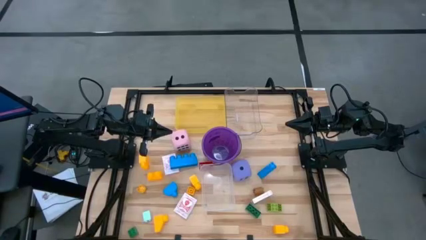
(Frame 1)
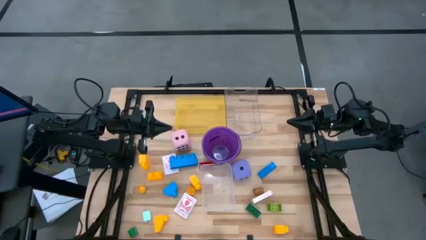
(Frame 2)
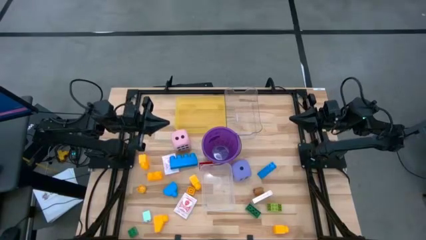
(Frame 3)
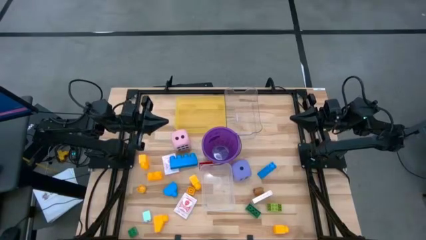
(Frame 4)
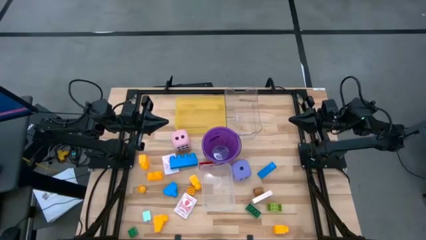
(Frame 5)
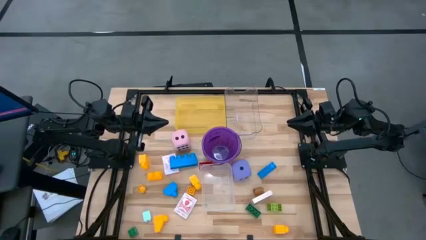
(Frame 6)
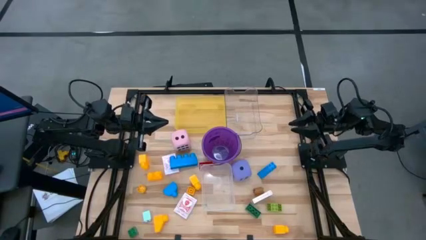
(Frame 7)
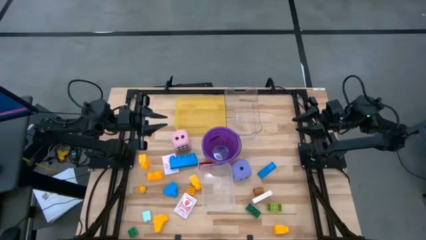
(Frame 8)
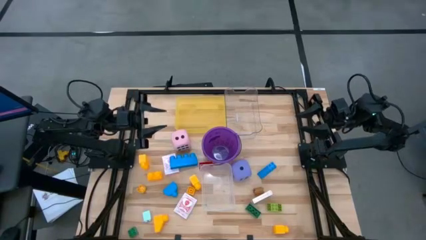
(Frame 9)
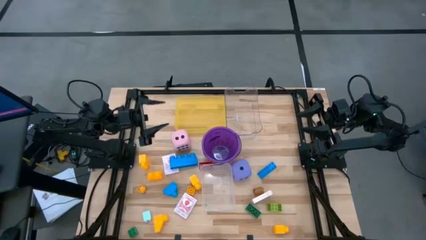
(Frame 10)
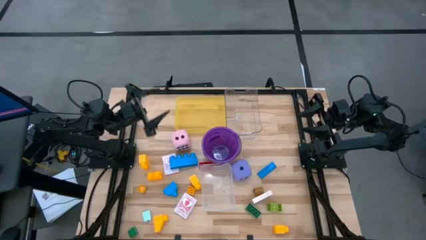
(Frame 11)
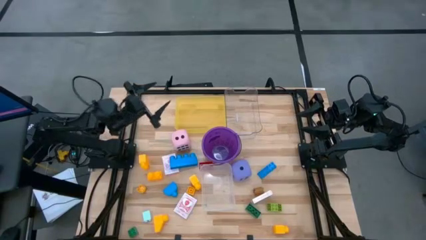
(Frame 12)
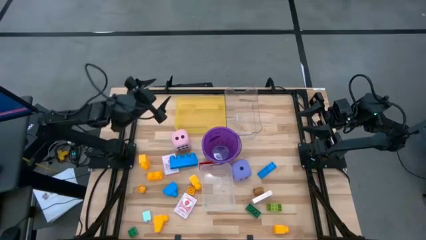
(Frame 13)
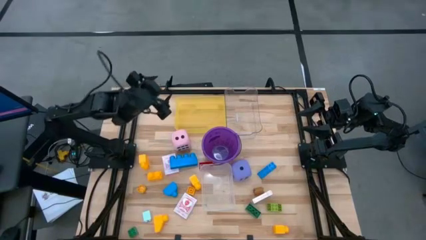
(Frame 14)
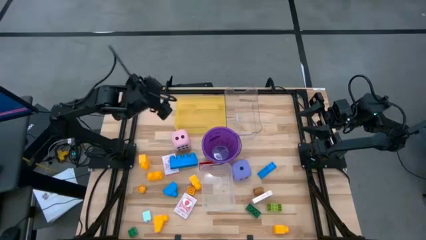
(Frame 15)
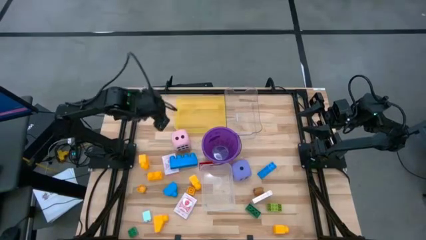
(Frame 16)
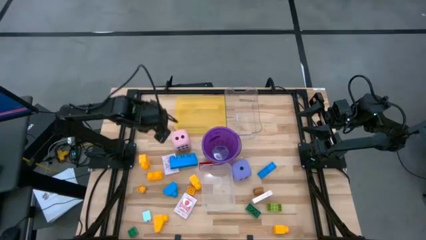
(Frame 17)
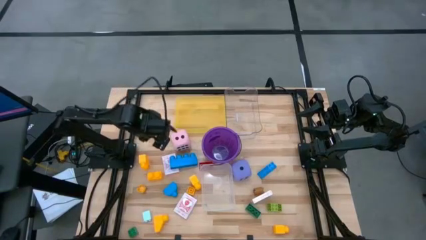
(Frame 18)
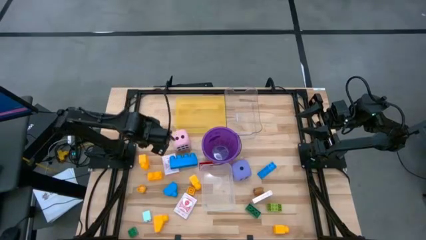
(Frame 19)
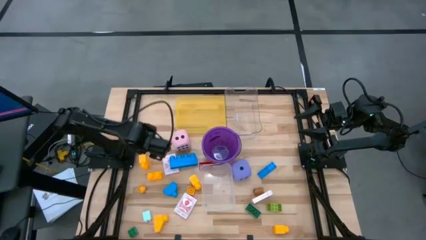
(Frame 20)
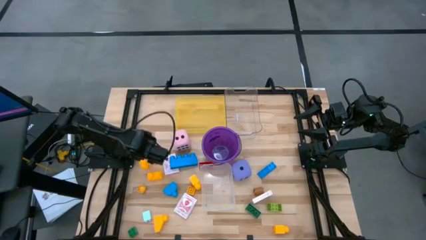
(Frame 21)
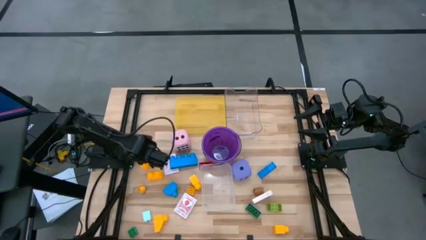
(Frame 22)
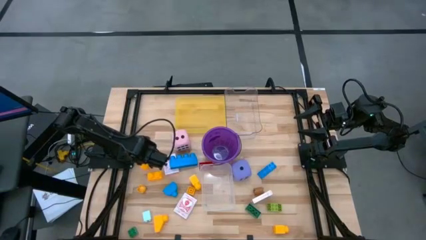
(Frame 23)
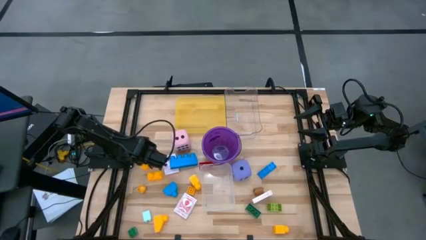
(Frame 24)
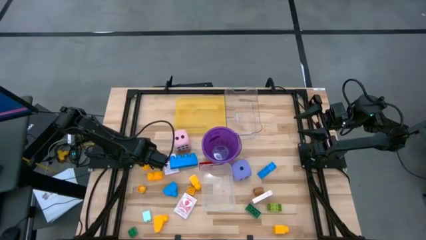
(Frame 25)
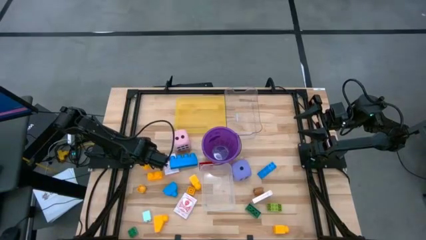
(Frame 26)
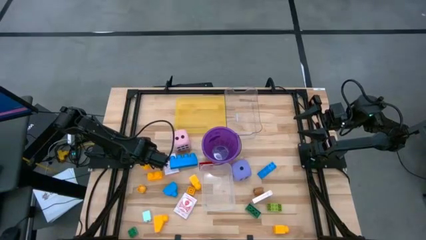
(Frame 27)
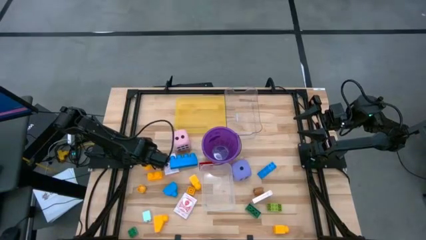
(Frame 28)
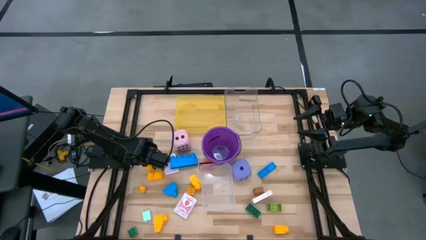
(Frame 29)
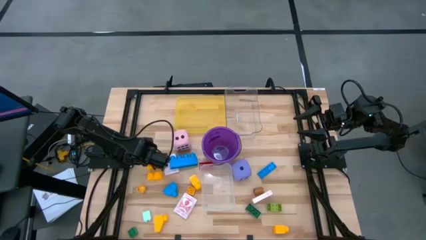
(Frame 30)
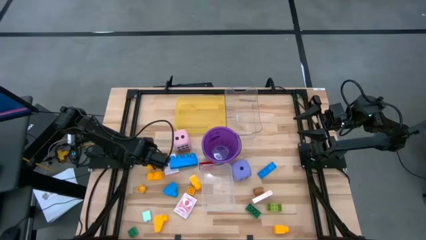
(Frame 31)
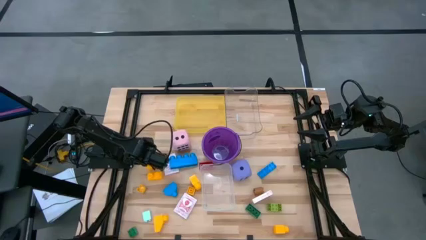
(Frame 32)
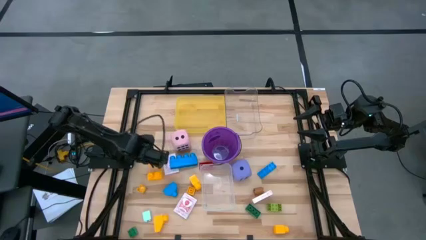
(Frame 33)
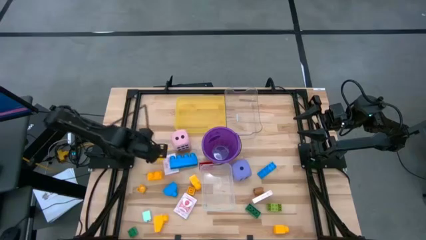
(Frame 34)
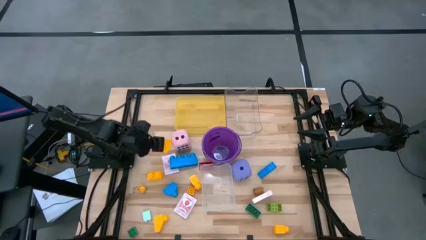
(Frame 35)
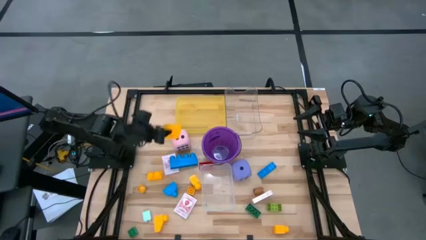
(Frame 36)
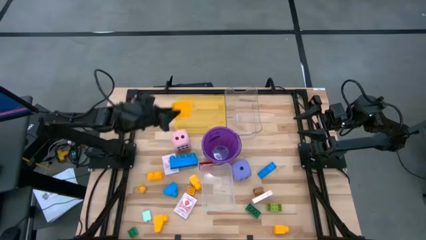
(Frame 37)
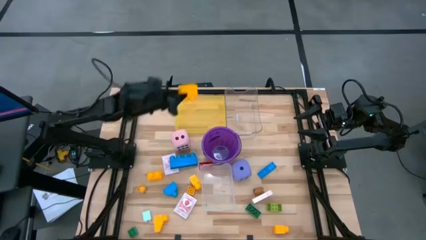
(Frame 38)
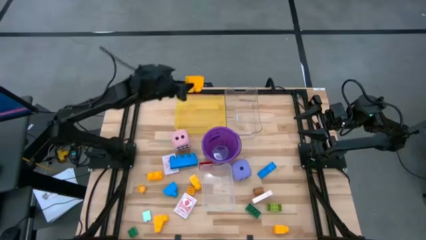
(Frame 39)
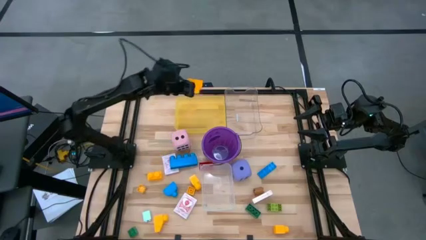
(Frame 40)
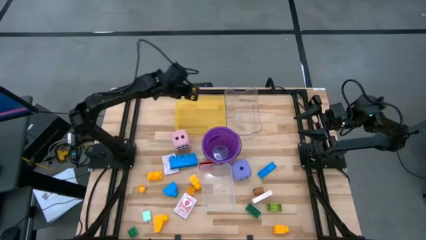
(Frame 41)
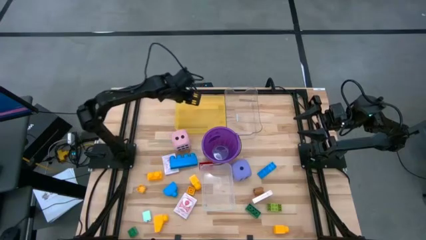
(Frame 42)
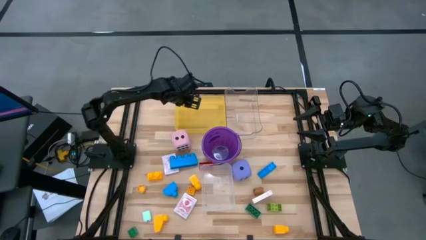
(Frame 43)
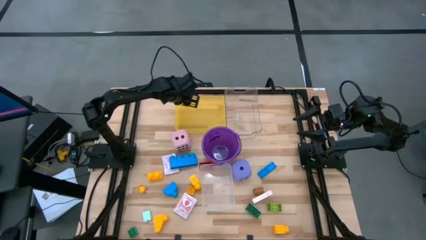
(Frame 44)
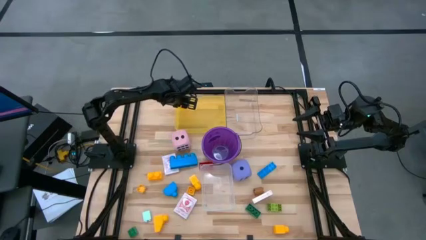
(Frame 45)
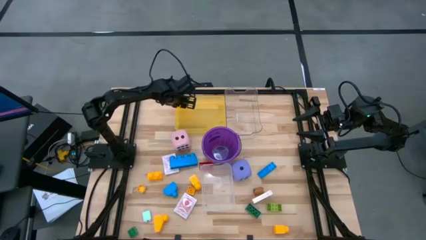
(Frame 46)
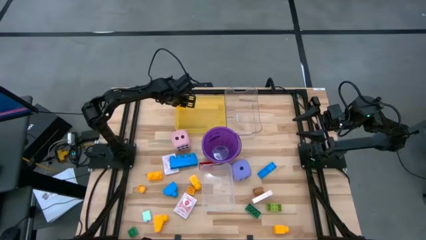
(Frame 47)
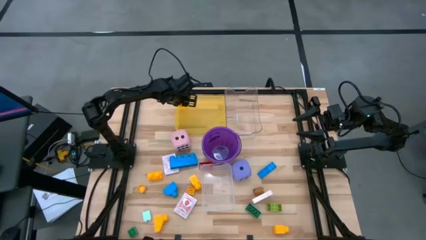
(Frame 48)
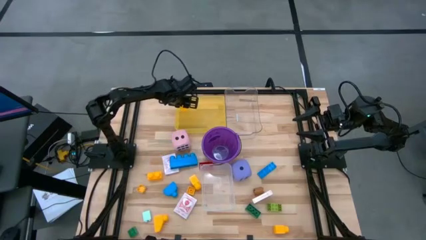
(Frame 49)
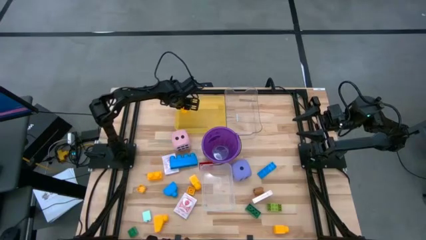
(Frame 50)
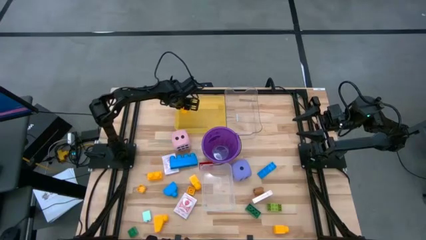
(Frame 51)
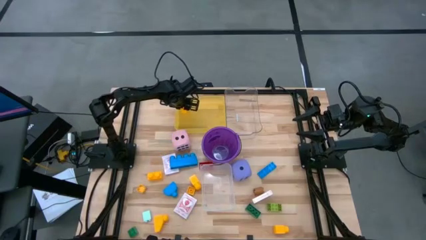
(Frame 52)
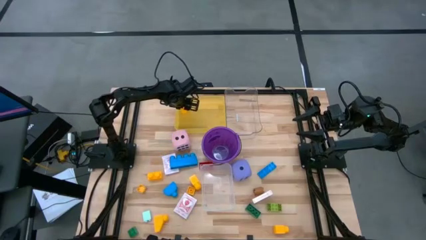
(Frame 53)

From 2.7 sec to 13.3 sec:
Task: Pick & Place Toys
Put the yellow game piece into the yellow bin

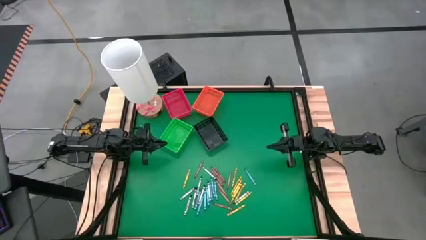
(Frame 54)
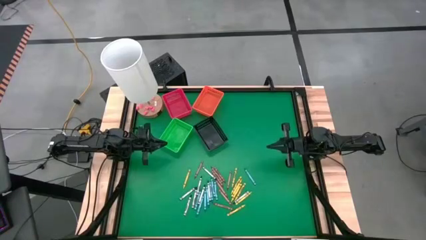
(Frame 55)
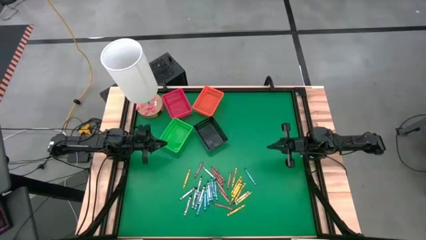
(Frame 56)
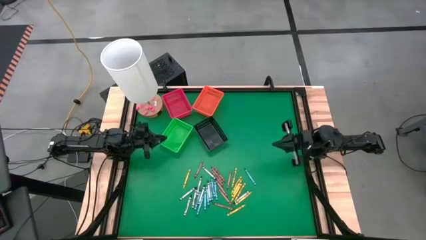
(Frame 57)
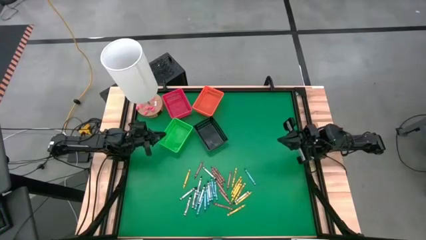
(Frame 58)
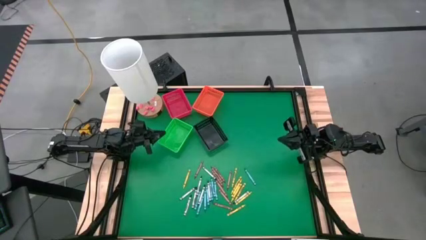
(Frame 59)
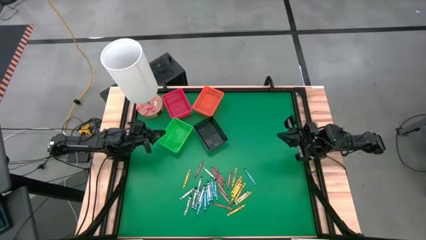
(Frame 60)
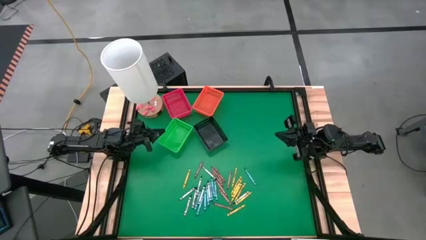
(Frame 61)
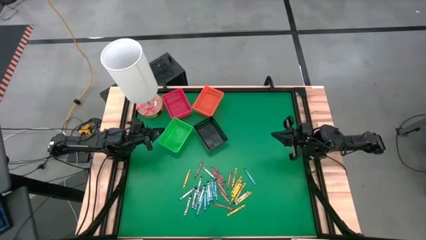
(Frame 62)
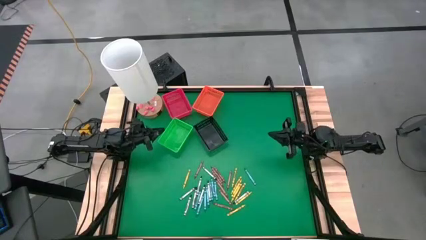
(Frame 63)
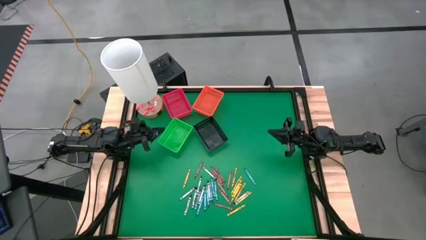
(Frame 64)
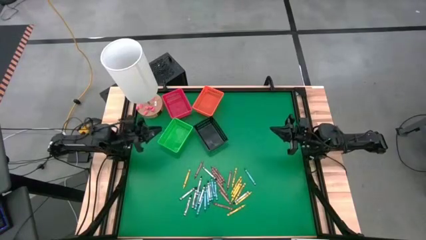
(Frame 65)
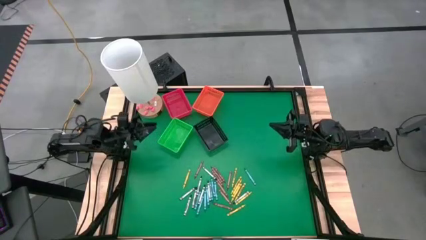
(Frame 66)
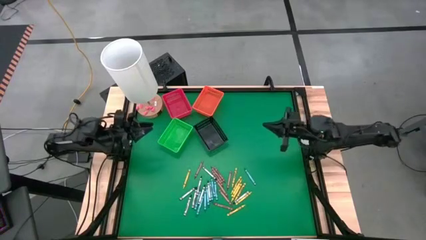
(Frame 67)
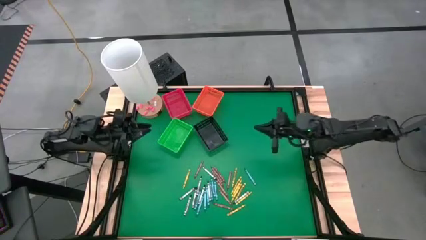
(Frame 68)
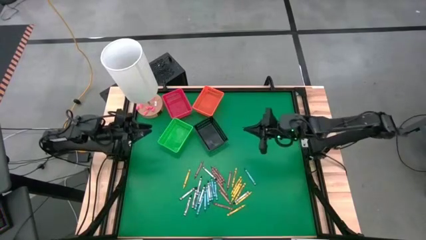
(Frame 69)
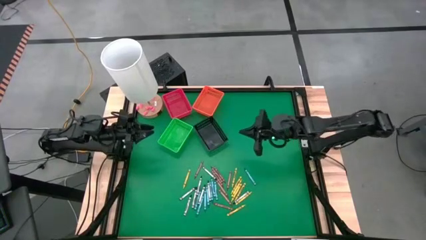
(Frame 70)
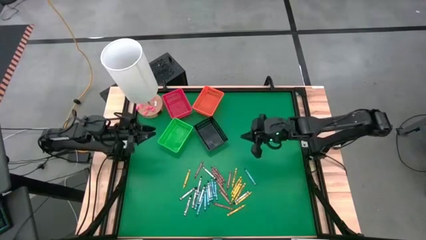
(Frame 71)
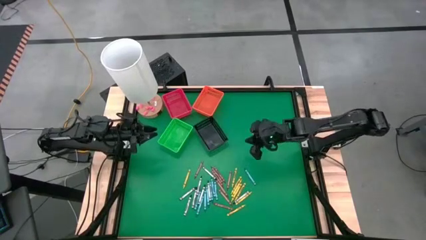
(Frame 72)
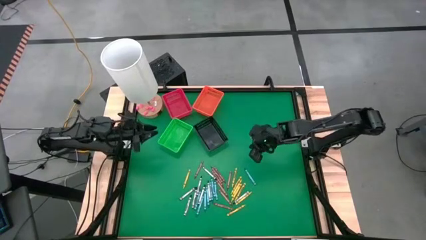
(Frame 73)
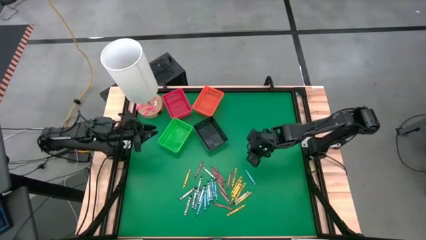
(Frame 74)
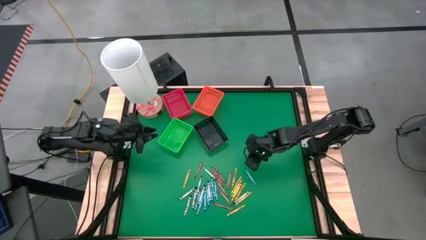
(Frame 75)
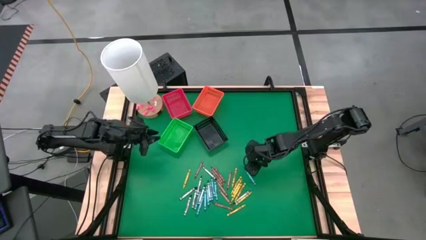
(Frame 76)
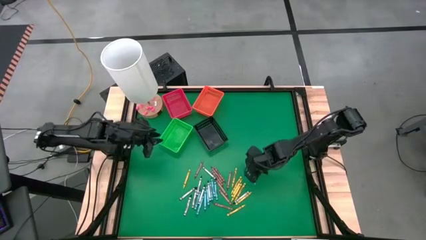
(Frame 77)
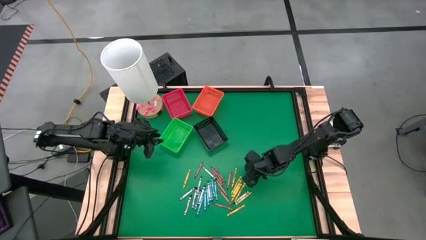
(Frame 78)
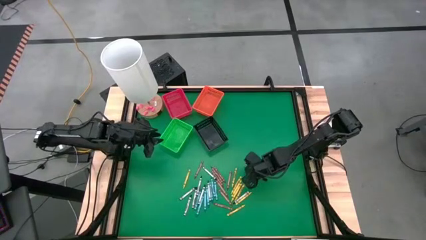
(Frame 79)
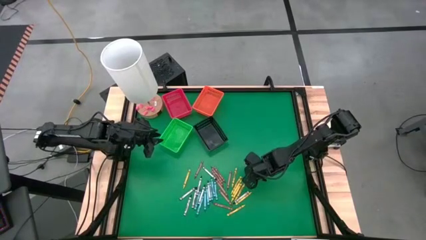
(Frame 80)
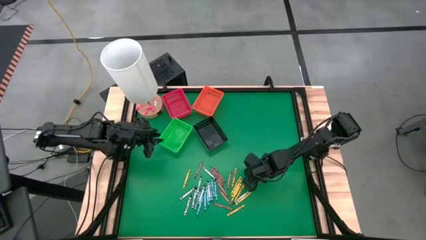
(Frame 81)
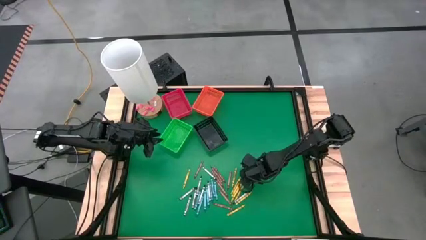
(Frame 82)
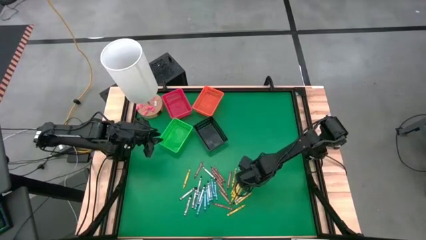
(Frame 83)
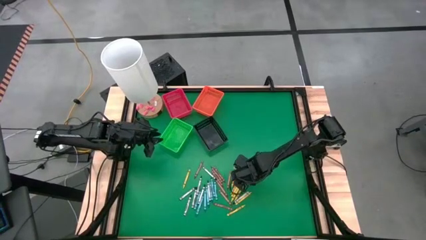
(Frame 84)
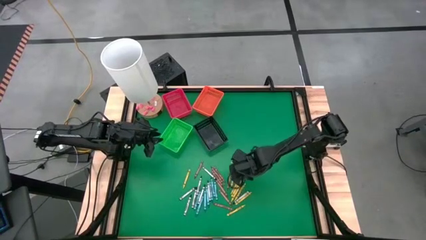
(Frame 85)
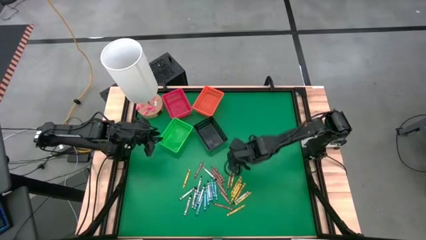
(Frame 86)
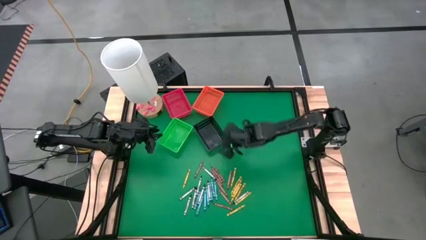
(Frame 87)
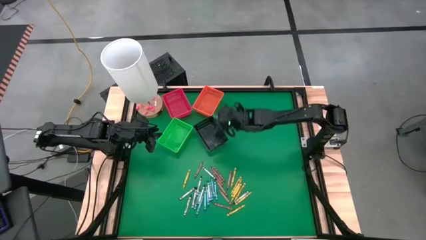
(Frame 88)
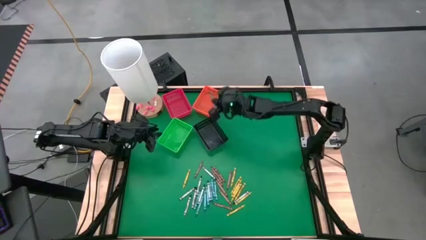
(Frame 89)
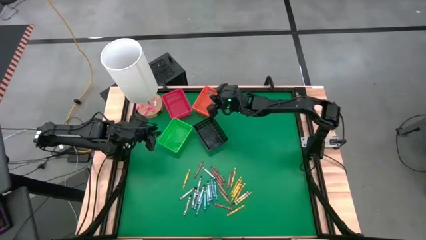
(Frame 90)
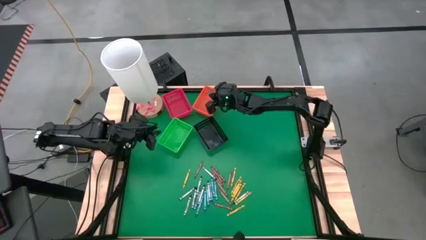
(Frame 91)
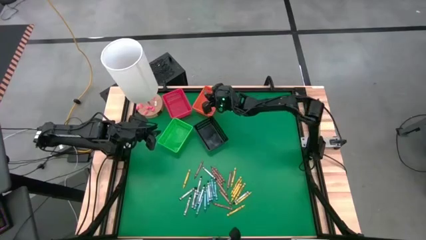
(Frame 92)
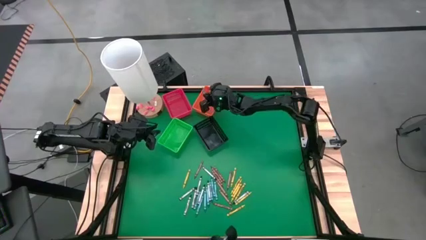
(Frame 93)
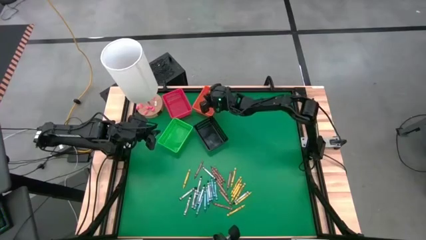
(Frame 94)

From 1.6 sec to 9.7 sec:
Task: Sort crayons
Put the blue crayon into the orange bin
